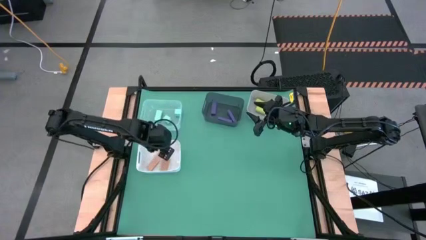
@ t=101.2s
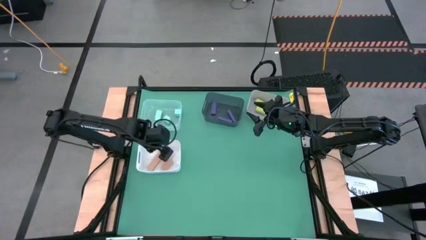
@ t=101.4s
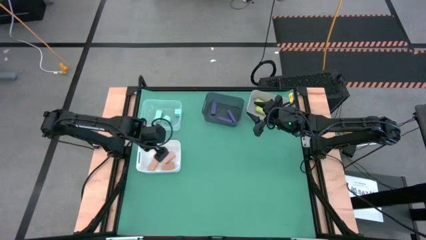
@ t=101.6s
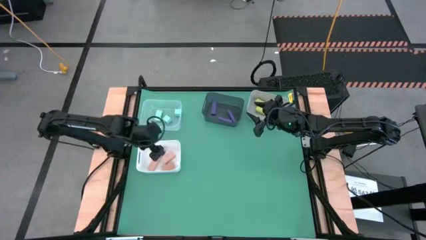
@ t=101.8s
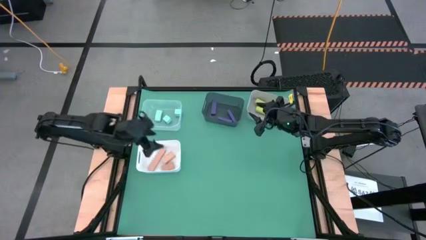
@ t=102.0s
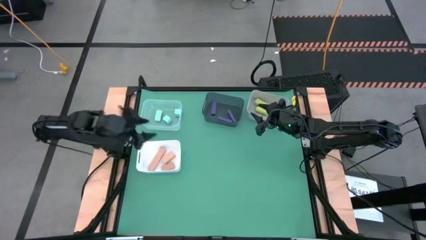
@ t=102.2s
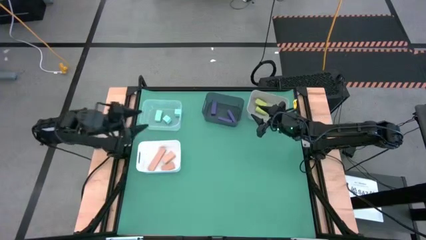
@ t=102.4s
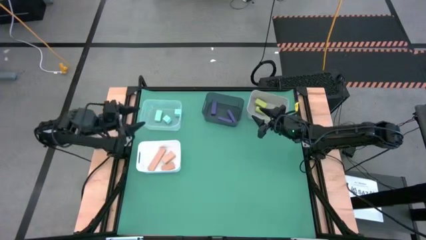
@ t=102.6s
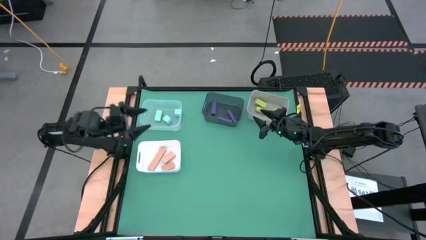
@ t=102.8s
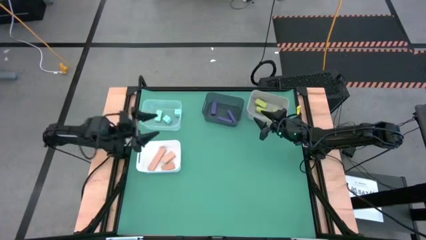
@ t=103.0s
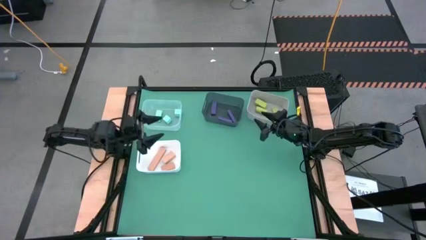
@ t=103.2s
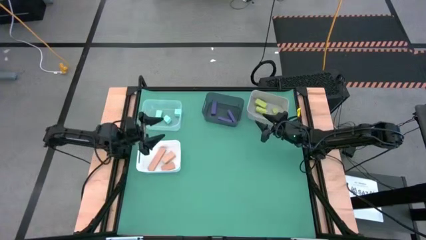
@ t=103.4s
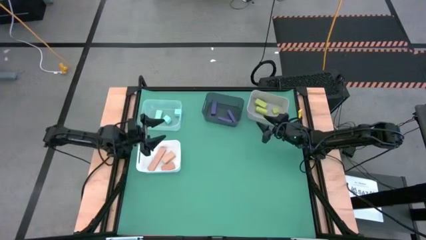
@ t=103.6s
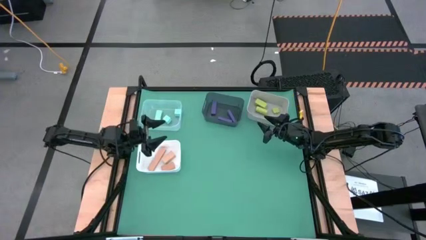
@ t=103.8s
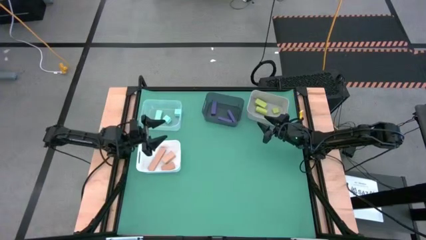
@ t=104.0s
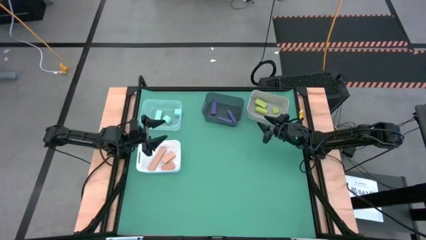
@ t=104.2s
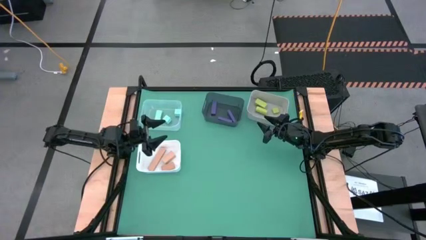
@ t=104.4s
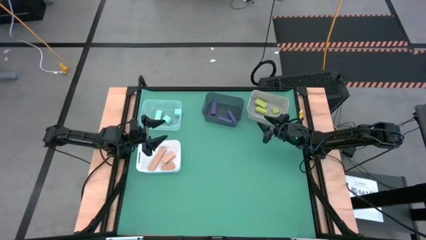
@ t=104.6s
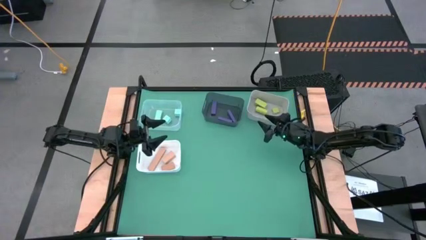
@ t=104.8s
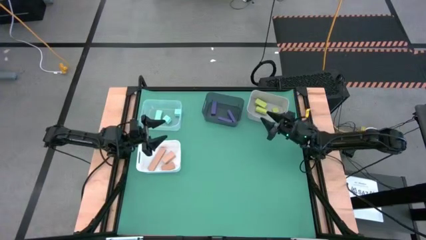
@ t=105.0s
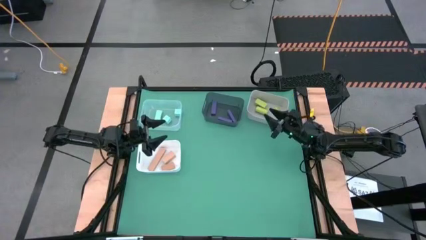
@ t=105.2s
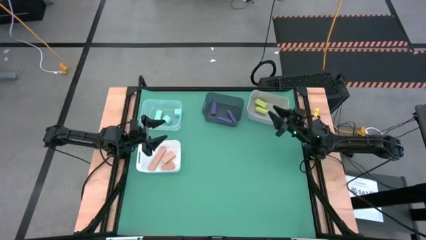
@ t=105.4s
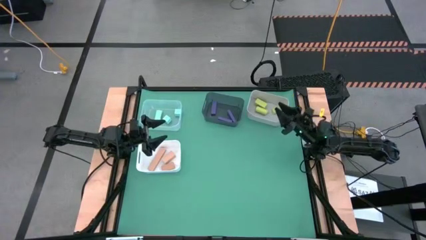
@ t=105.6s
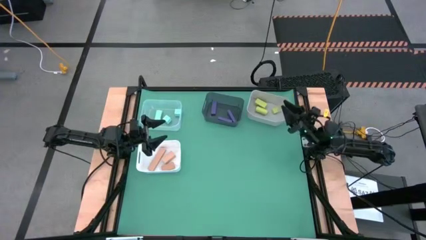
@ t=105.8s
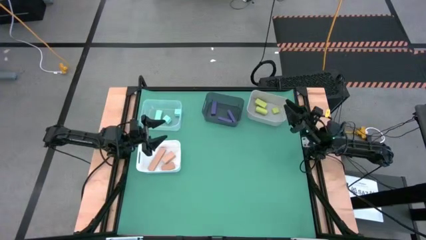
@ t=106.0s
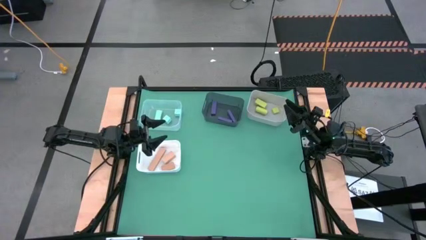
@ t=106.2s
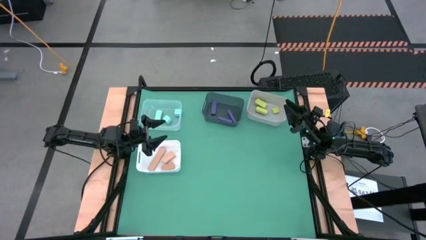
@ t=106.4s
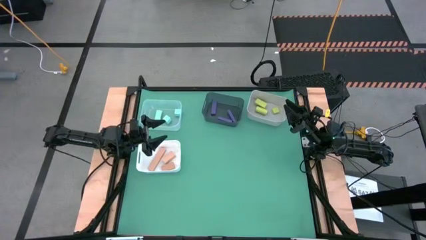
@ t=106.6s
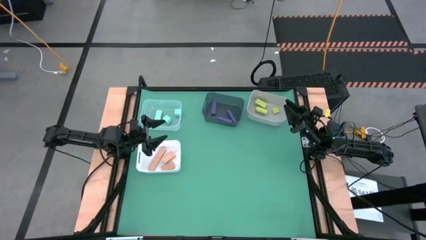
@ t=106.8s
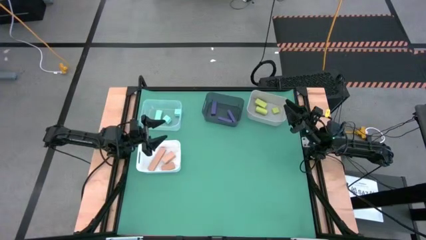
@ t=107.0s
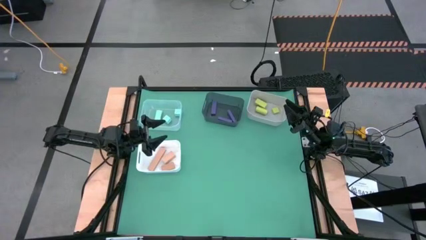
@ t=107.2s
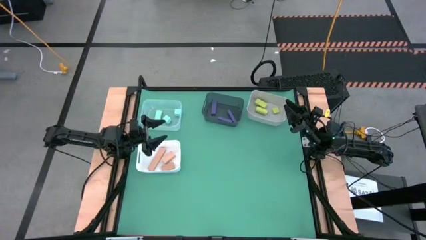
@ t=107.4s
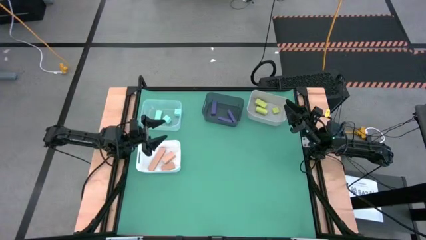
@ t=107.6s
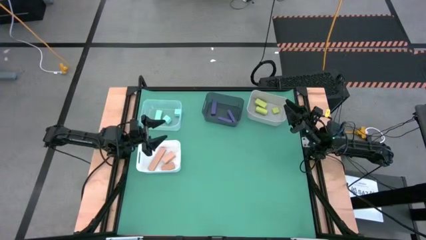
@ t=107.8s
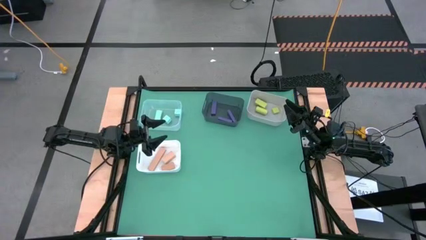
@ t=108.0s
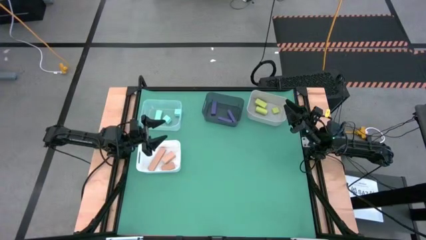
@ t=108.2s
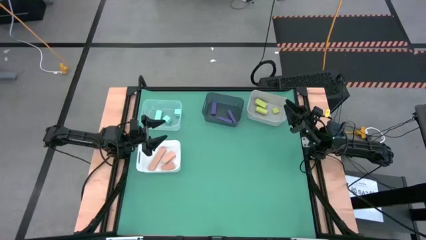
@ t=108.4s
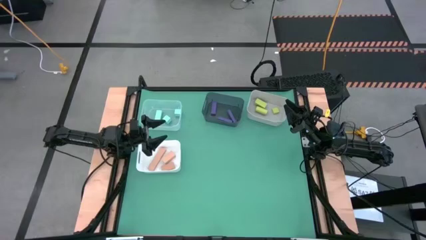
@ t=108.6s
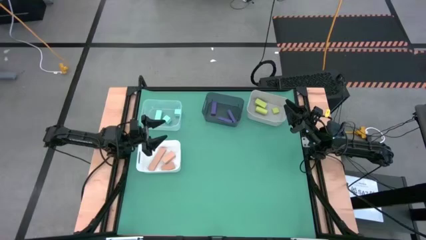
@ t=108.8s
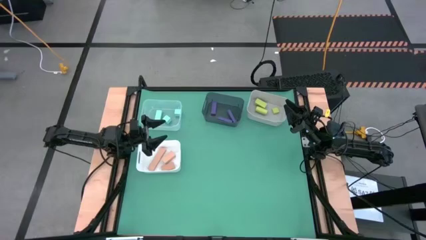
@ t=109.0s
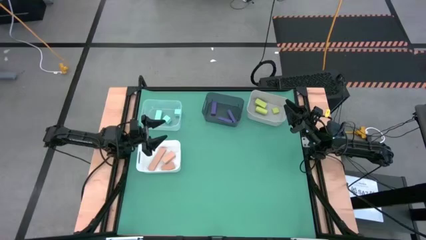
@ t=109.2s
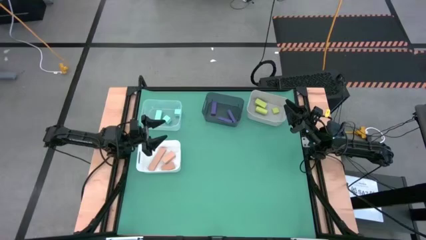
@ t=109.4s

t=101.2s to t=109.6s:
Task: Sort & place blocks by color
Return to Home Position
